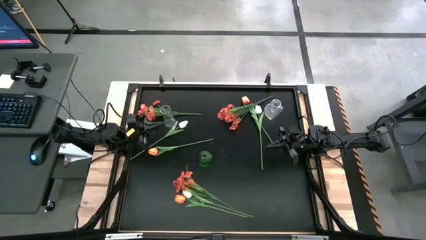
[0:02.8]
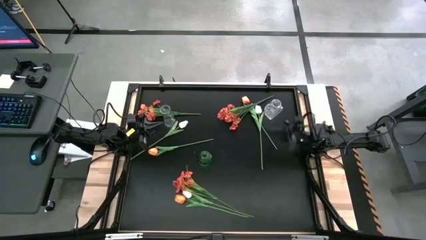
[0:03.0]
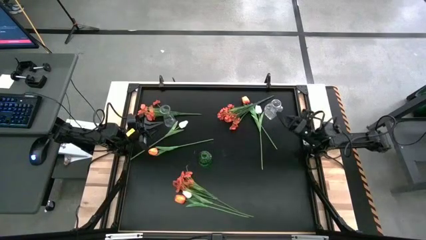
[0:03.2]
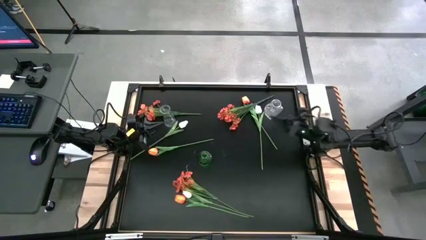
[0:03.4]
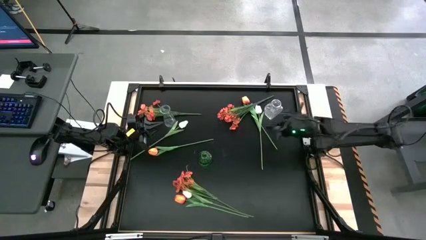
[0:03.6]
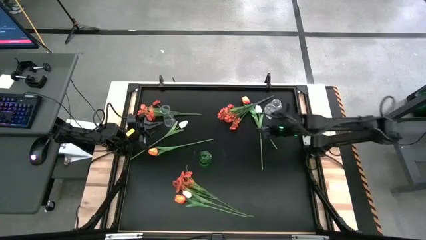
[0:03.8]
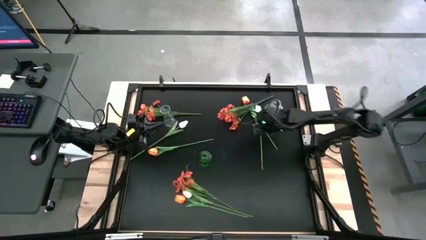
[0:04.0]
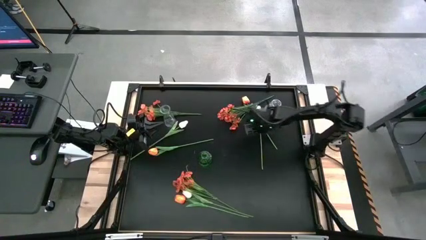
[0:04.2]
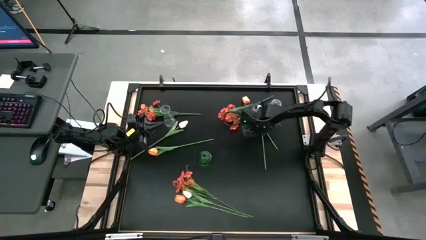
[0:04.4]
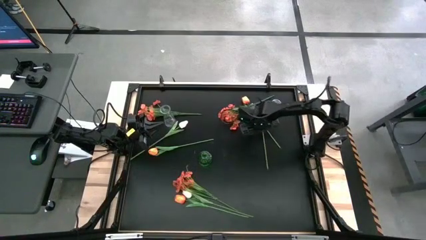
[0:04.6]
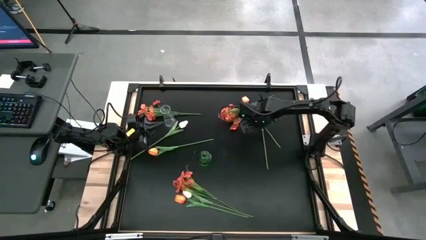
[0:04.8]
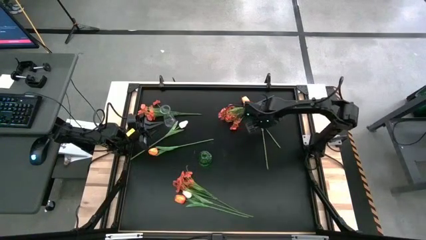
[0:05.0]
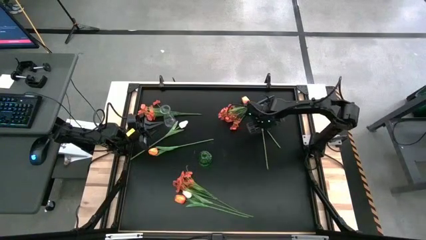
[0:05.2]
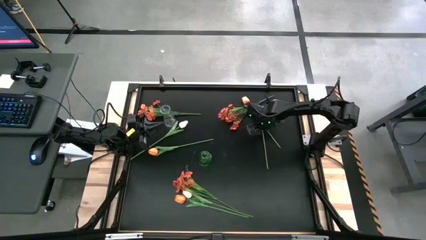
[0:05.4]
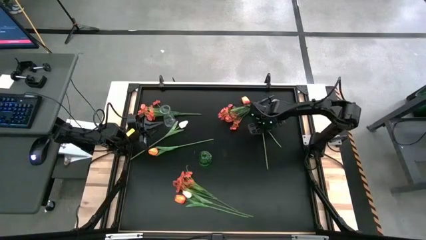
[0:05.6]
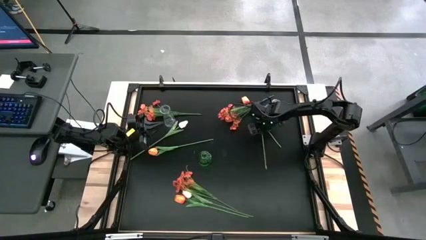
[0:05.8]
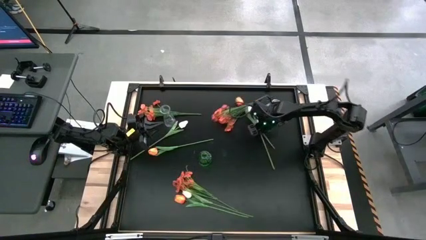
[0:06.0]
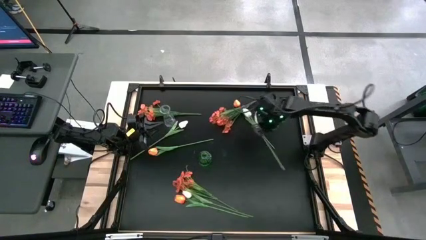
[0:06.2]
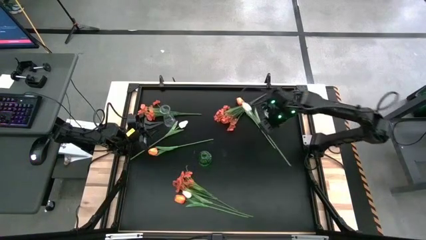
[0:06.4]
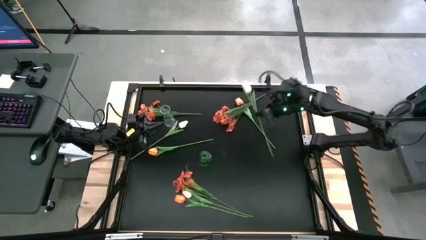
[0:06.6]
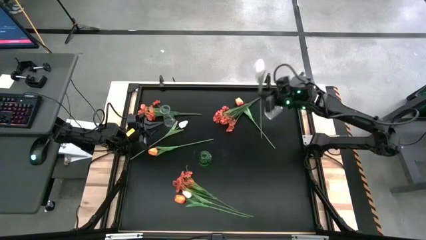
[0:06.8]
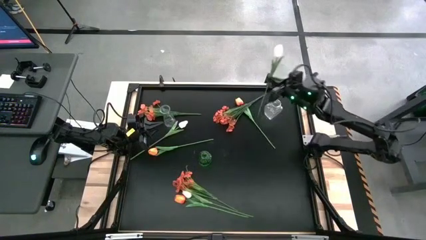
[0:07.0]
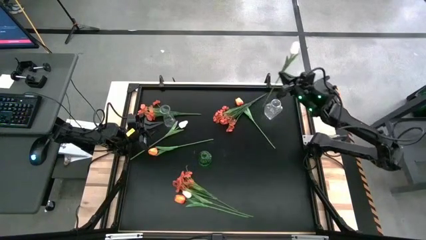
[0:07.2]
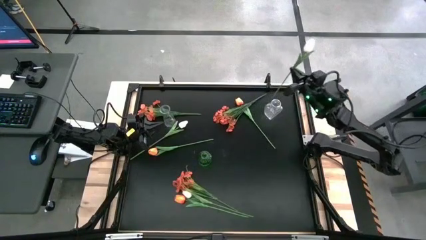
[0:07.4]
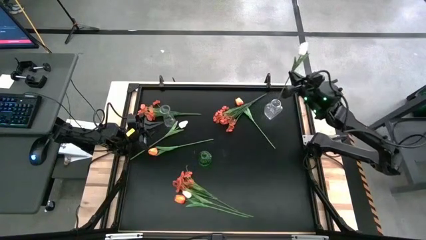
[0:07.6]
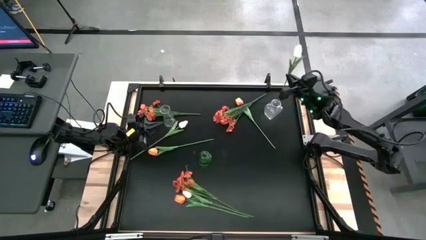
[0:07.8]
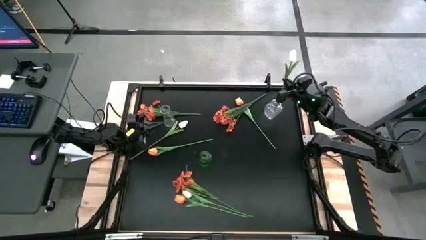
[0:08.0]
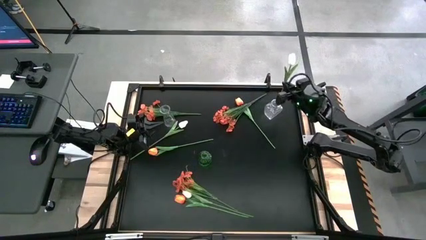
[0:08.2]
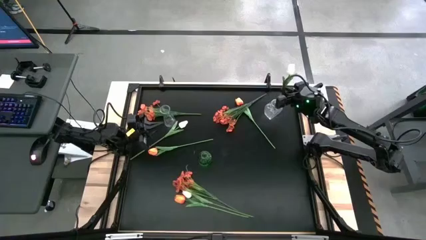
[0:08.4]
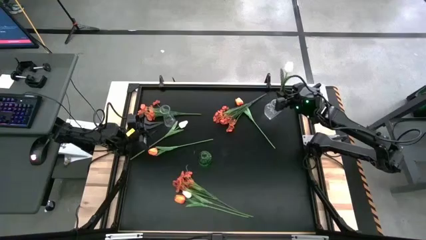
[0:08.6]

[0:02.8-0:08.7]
Task: Sort flowers into vase by color
Put the top right white flower into the right transparent vase

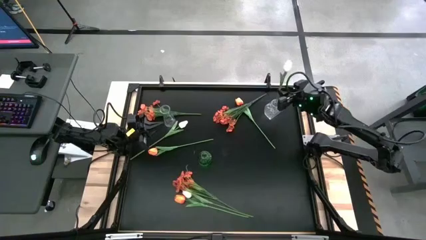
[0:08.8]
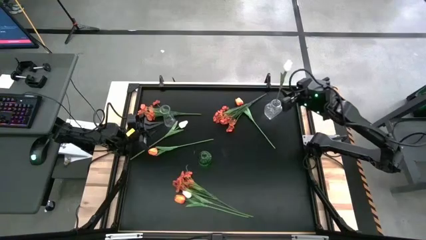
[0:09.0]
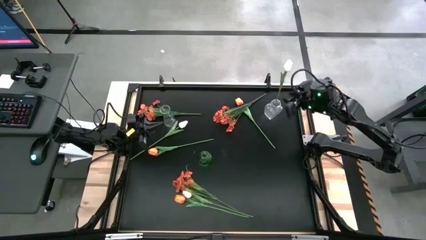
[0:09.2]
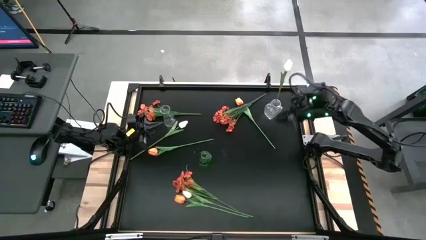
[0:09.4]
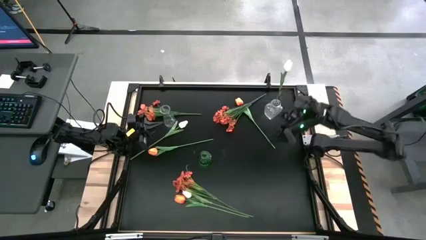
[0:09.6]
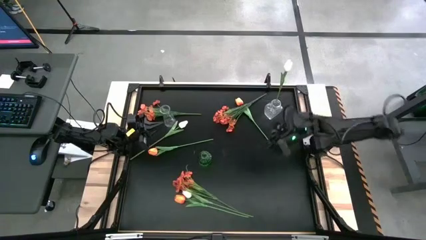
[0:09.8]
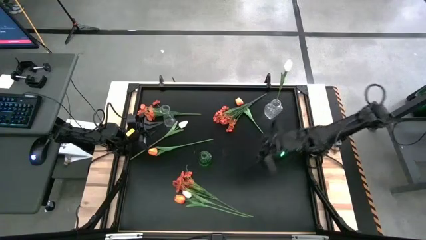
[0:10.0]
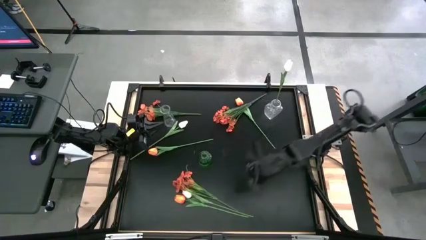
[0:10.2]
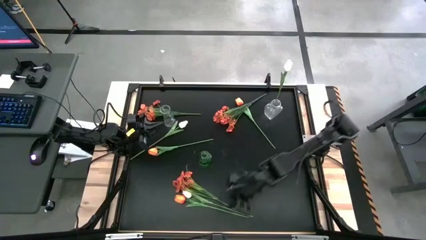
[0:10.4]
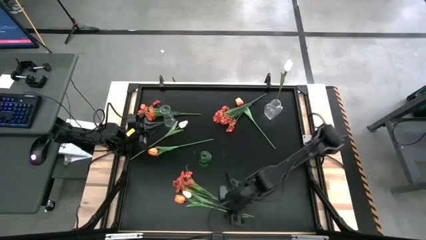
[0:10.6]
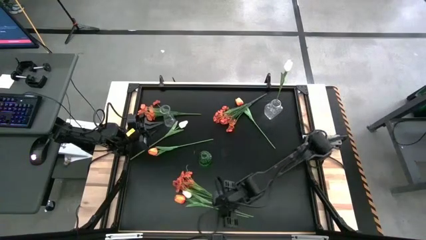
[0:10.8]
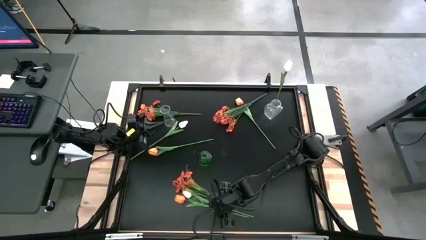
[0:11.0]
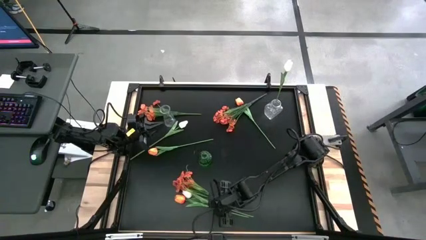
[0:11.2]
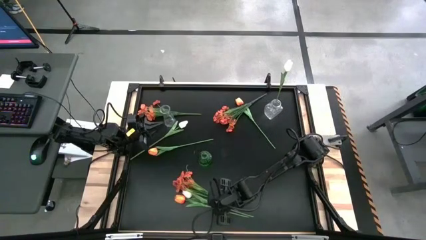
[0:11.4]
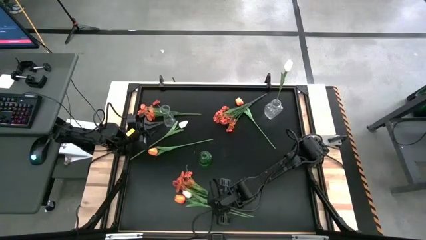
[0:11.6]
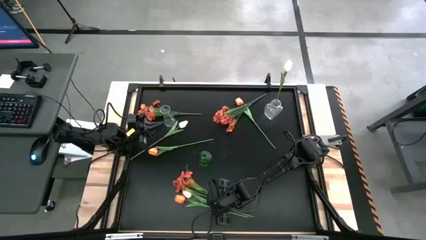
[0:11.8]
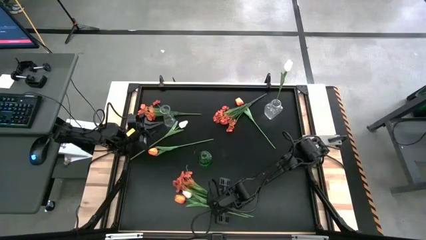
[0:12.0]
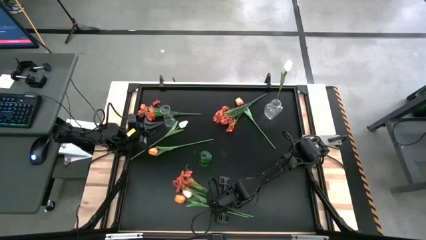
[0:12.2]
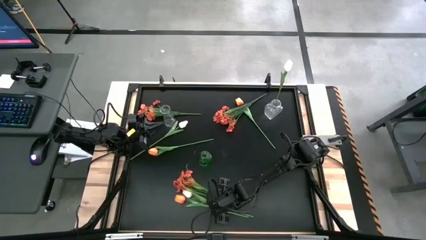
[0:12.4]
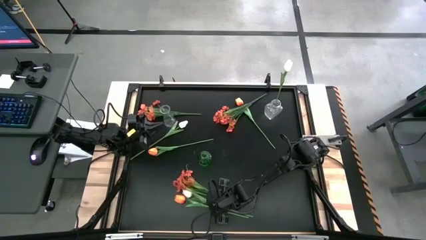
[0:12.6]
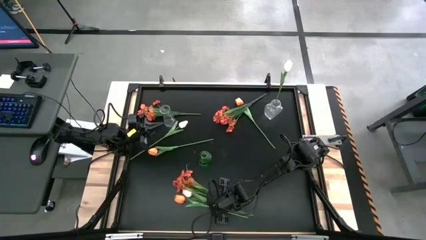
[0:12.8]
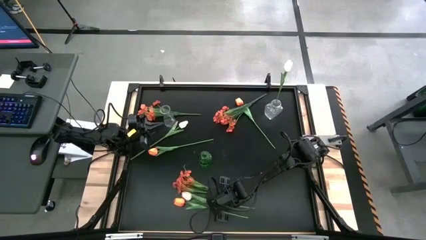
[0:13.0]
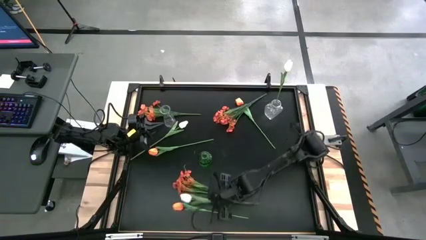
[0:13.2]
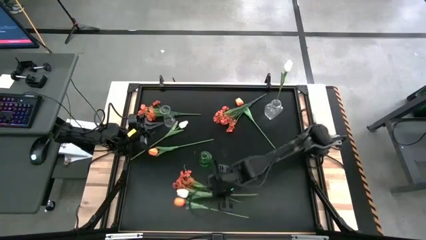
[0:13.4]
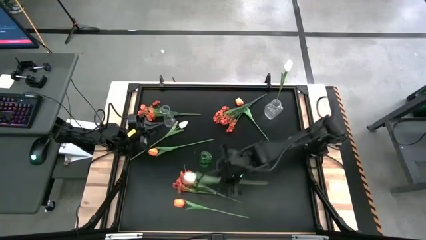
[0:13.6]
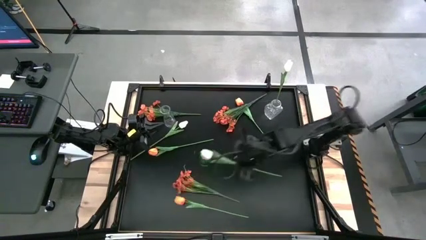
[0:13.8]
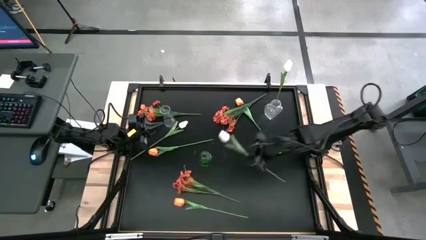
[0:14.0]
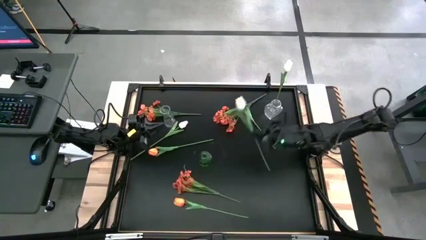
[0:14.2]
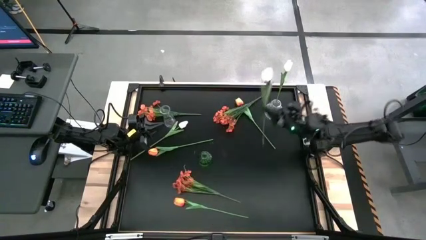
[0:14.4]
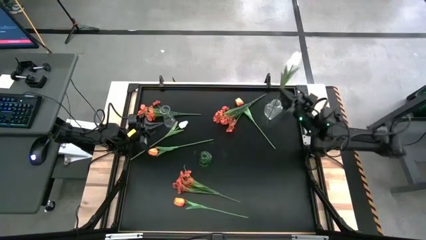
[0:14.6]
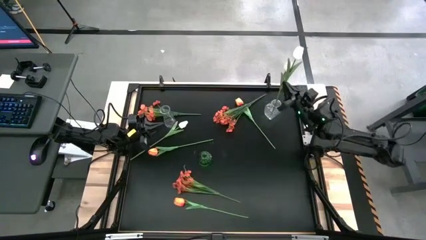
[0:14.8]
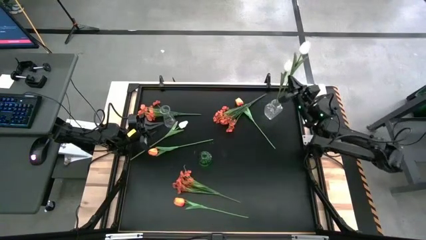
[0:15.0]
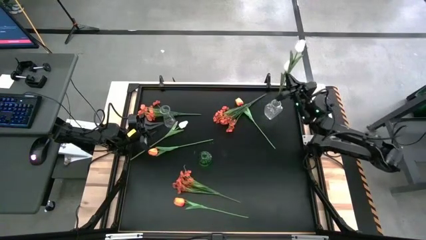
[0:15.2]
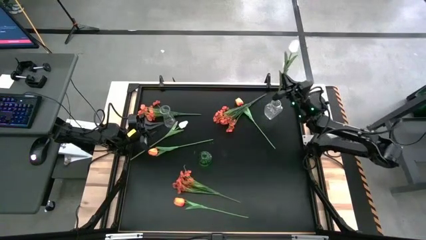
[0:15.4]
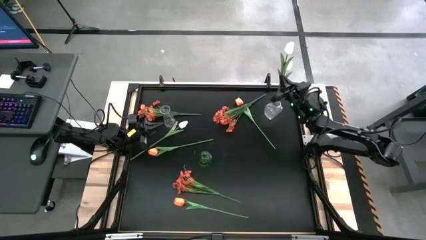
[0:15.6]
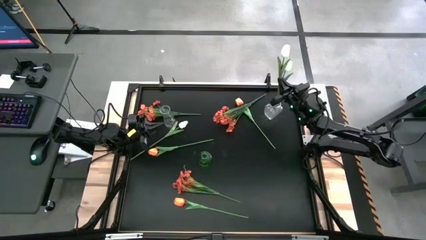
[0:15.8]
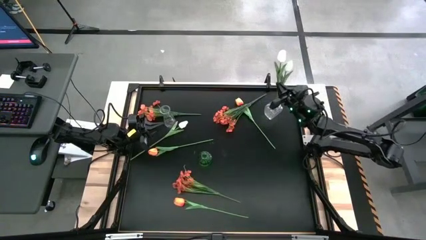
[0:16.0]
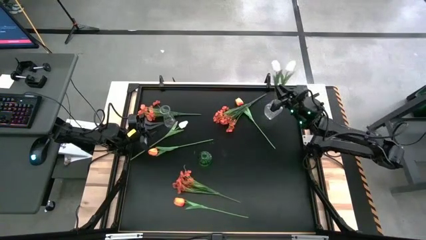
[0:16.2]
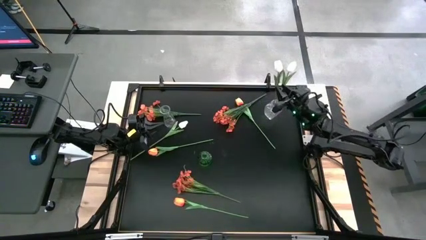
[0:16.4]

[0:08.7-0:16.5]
Put the bottom white flower into the right transparent vase

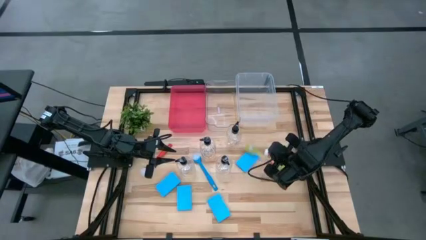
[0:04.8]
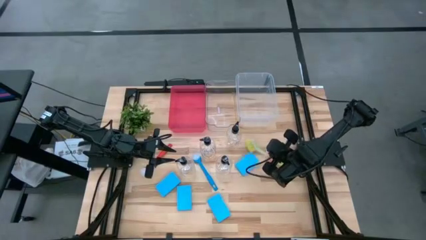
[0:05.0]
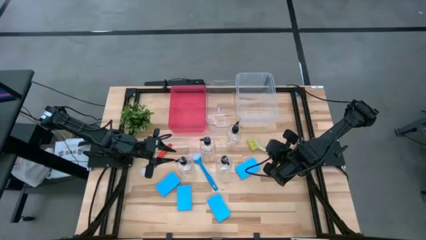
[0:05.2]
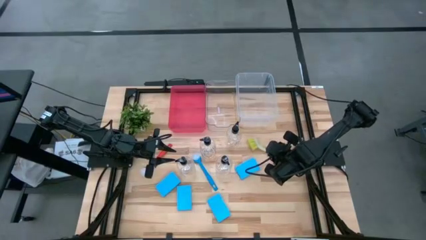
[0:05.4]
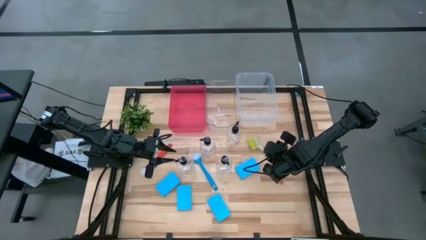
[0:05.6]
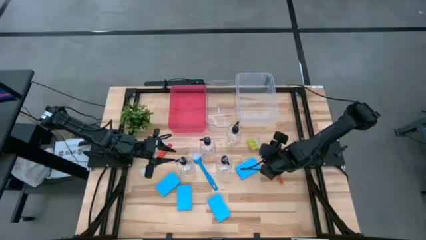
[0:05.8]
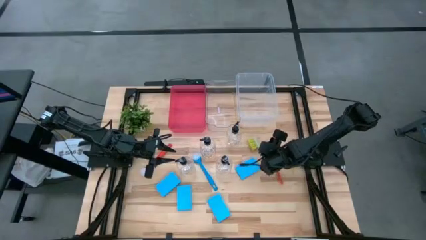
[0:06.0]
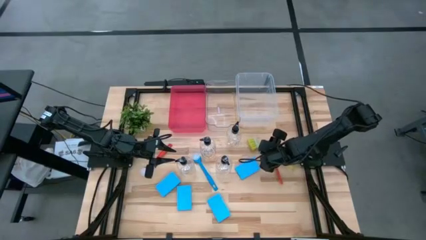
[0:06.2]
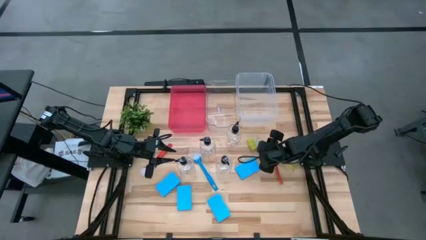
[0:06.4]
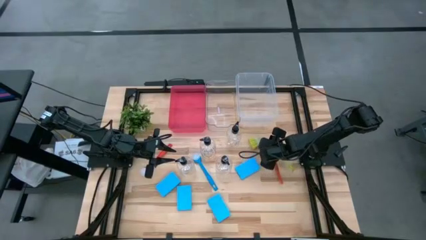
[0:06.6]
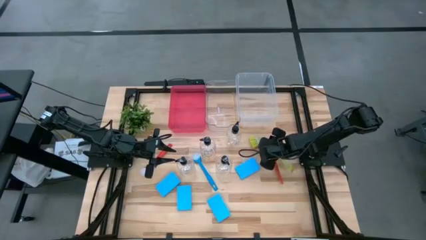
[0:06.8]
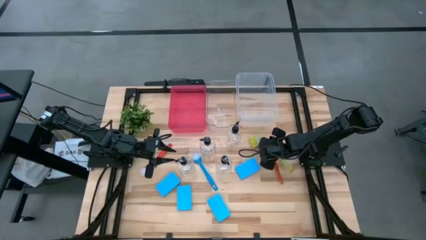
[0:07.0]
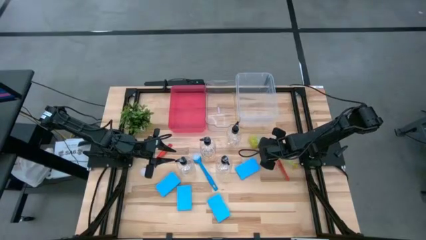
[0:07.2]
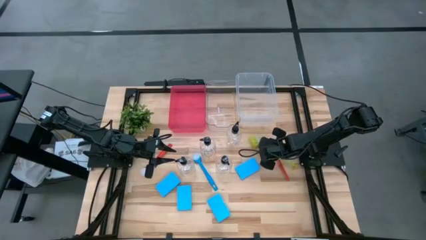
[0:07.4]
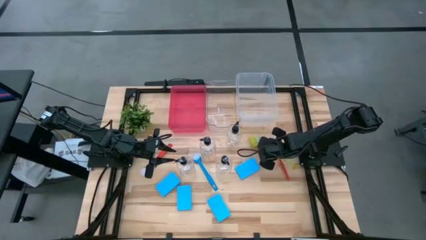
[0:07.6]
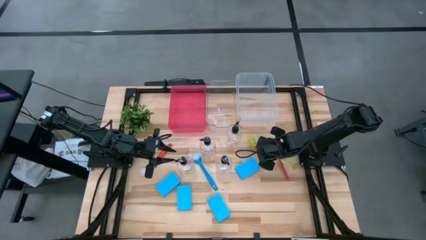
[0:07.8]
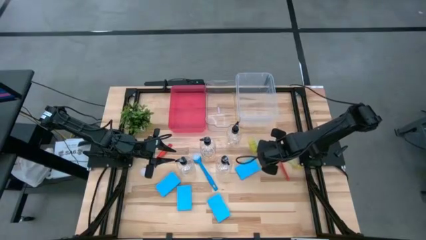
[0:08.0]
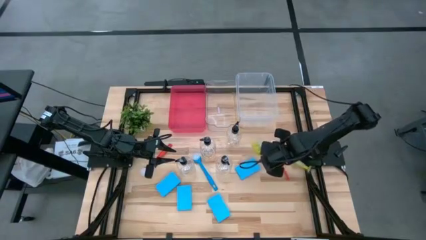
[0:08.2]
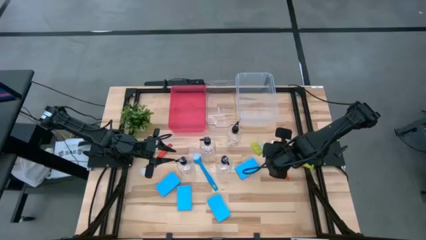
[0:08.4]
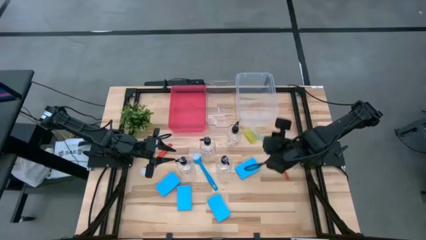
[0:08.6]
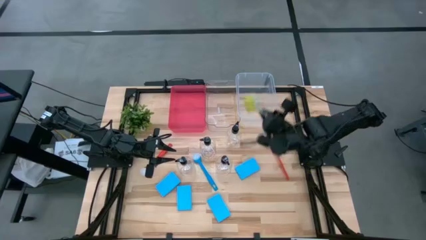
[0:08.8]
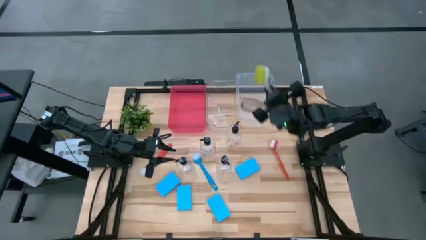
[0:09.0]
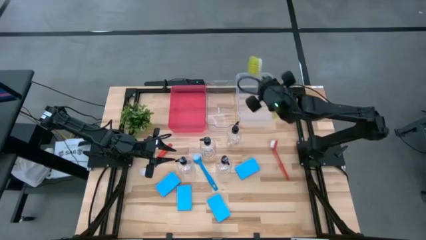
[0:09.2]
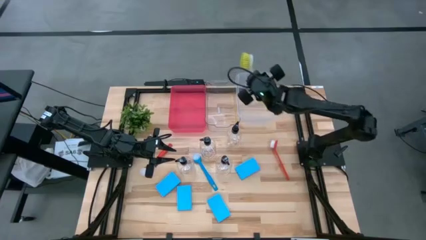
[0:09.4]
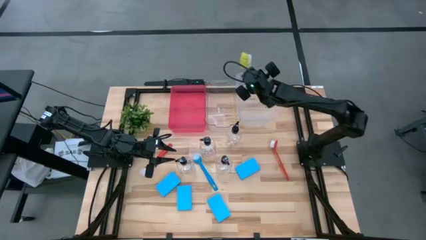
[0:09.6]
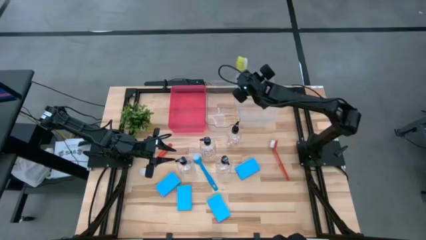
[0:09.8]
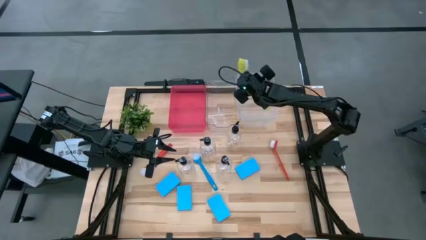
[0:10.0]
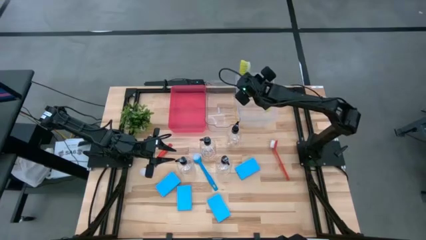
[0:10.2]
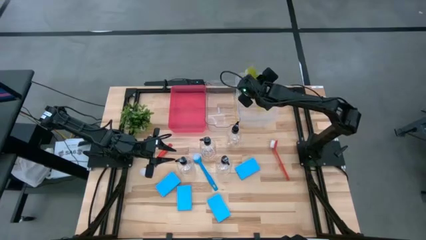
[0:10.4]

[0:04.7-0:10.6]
Task: Pick & Place Kitchen Sink Supplies
Put the yellow kitchen brush into the white bin
